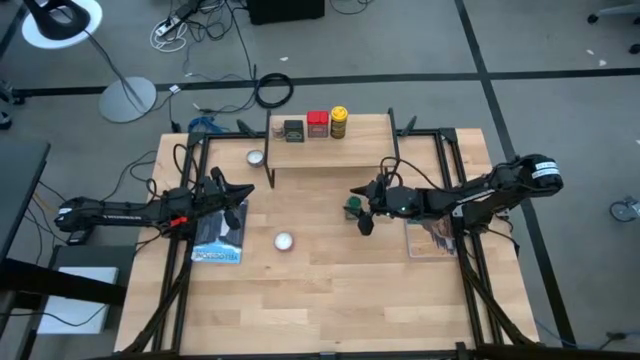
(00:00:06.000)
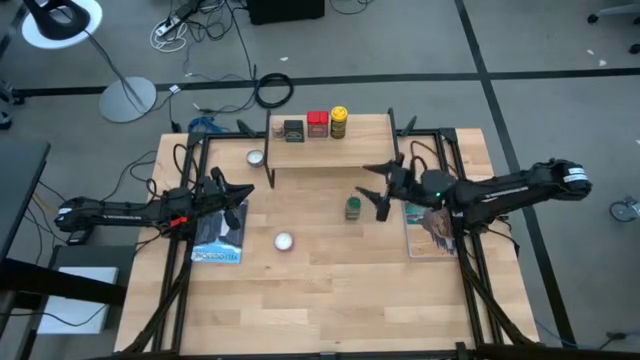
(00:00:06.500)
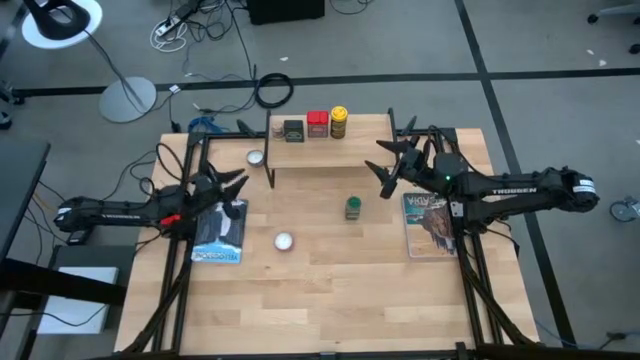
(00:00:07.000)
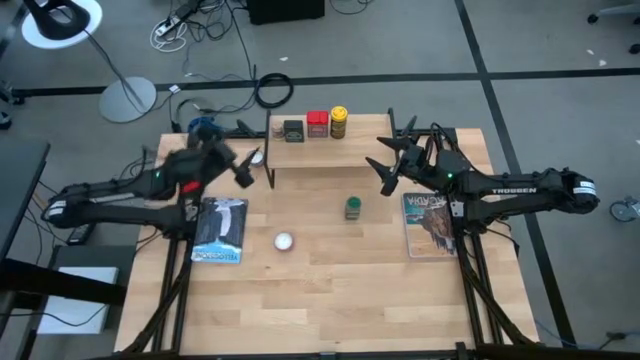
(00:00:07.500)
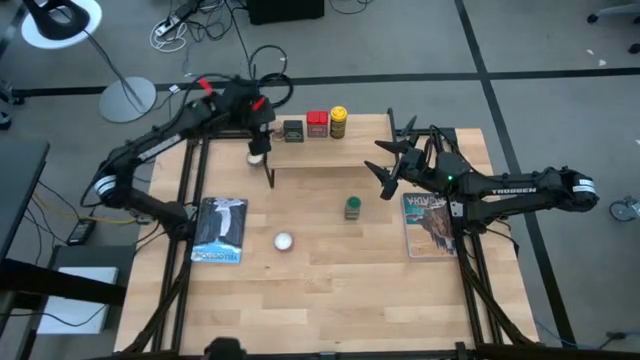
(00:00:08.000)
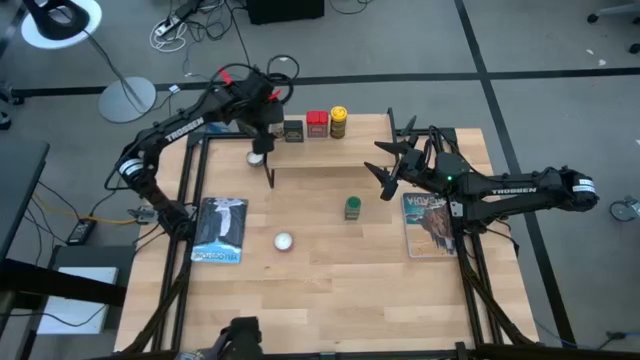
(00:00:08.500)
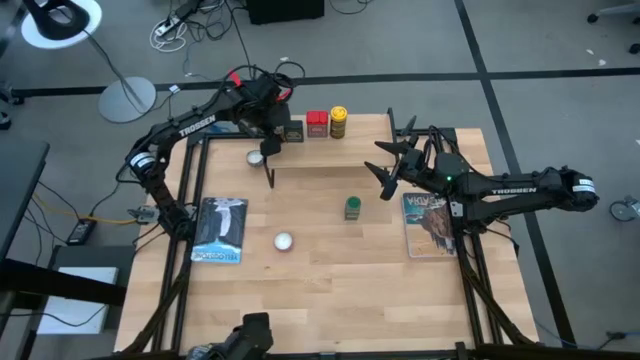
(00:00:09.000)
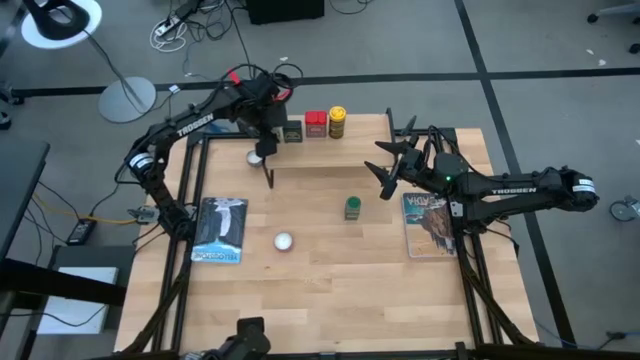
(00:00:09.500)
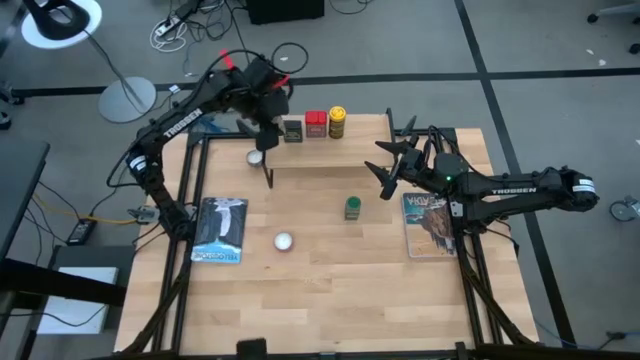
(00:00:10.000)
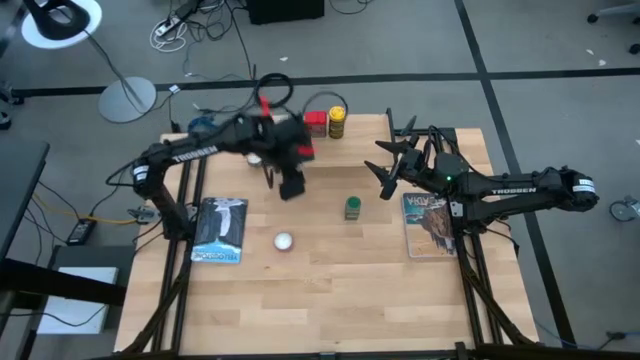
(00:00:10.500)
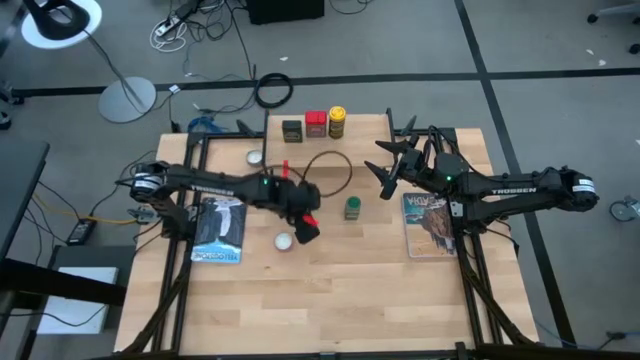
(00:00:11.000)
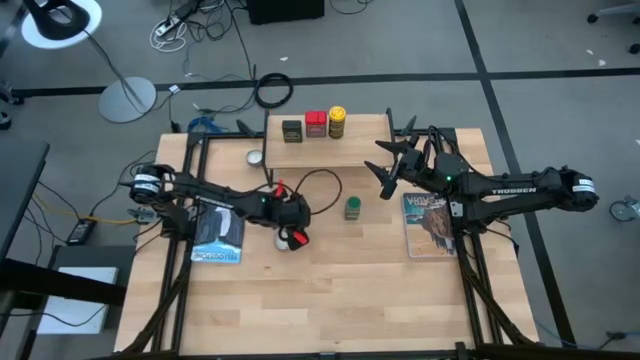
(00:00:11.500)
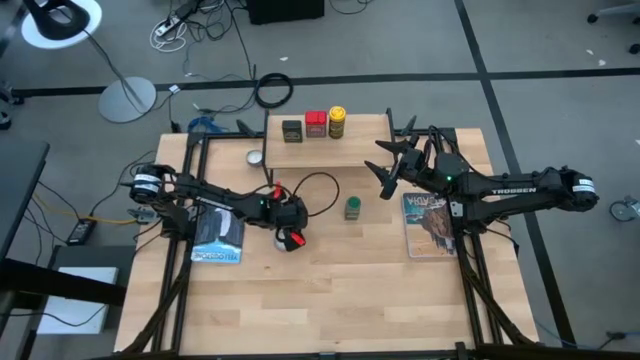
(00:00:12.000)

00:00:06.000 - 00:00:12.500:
Task: Shelf spices
Remove the brown seasoning bottle from the shelf

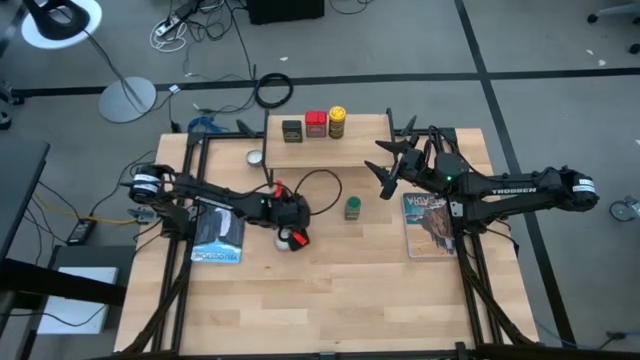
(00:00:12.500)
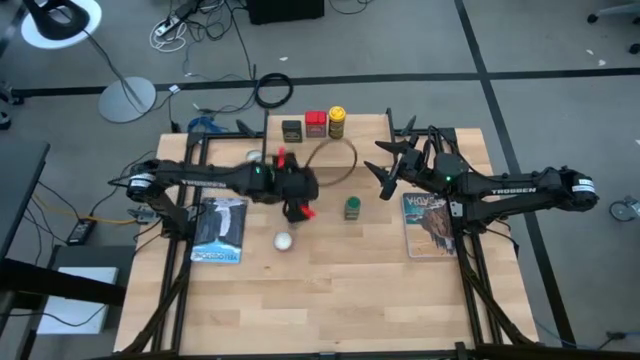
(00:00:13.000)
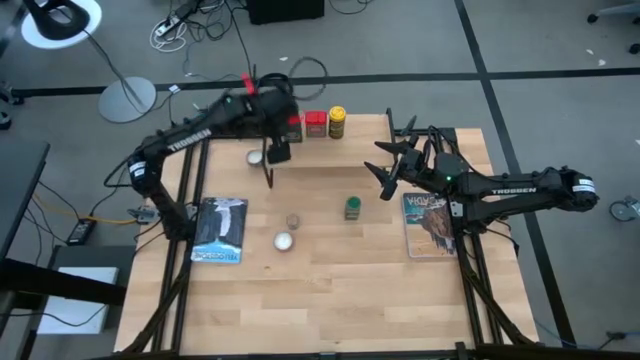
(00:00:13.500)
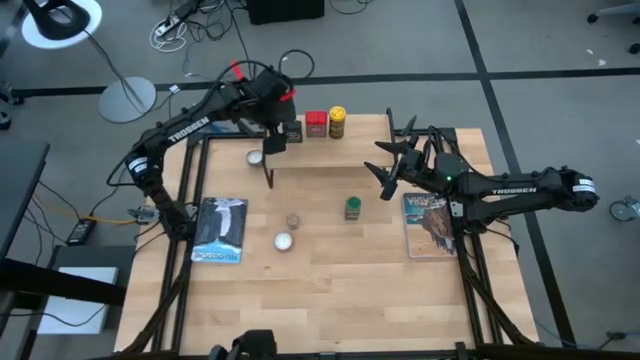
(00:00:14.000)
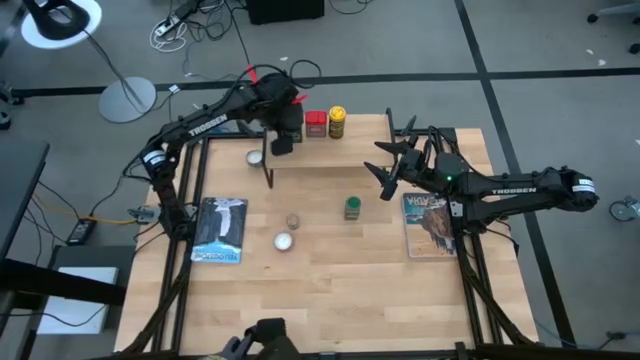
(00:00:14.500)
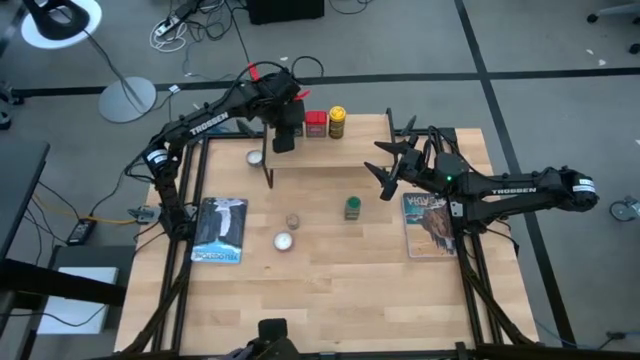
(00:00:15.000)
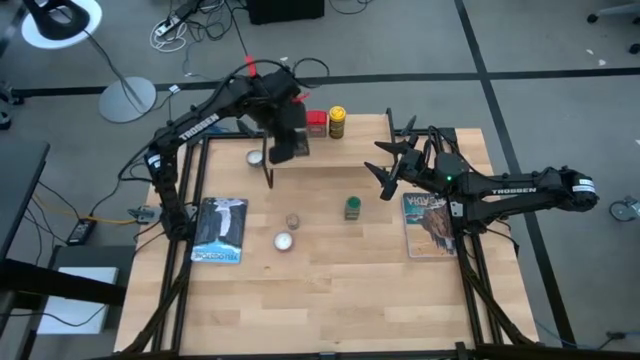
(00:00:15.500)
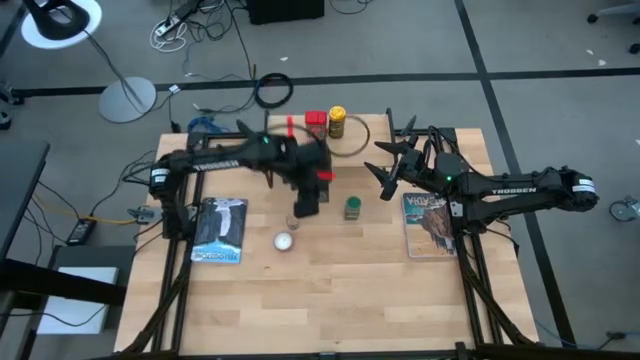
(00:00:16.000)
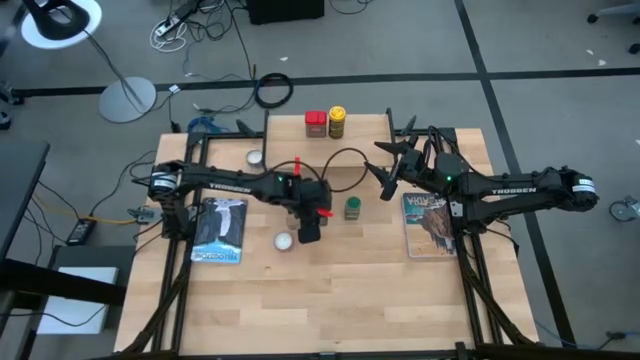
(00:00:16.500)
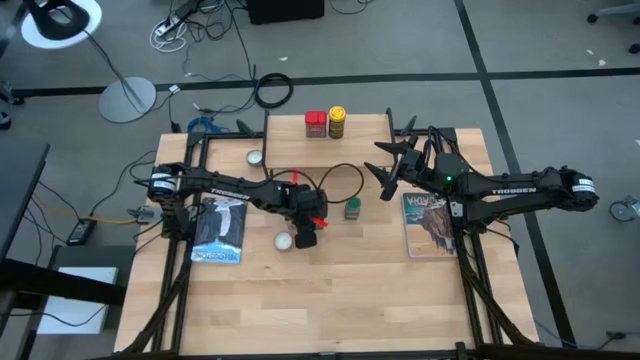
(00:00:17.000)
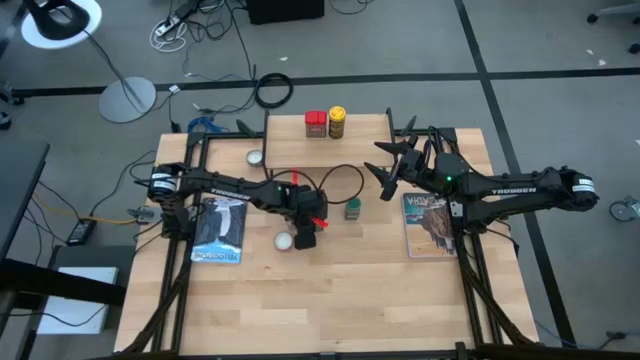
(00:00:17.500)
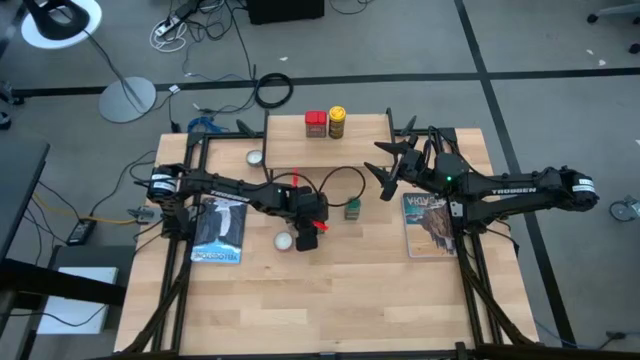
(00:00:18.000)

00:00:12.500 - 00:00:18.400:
Remove the black seasoning can from the shelf

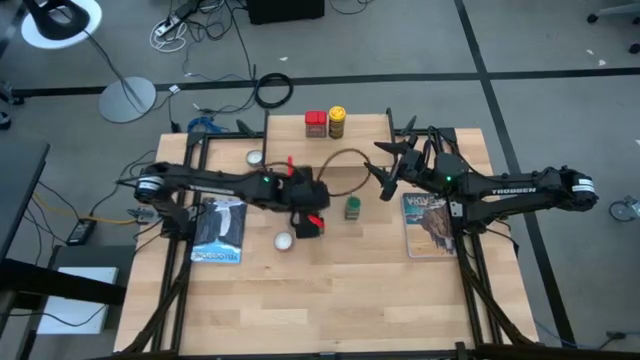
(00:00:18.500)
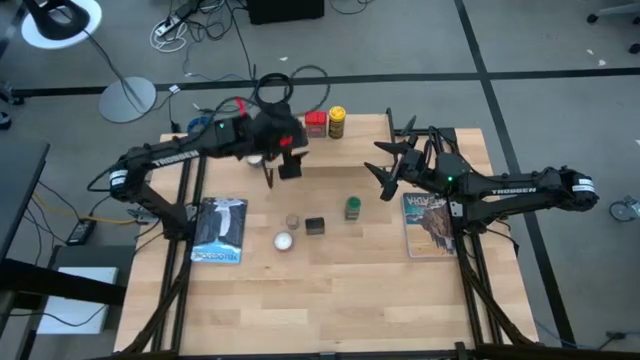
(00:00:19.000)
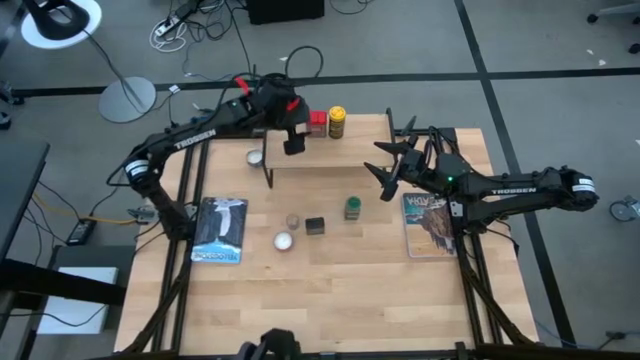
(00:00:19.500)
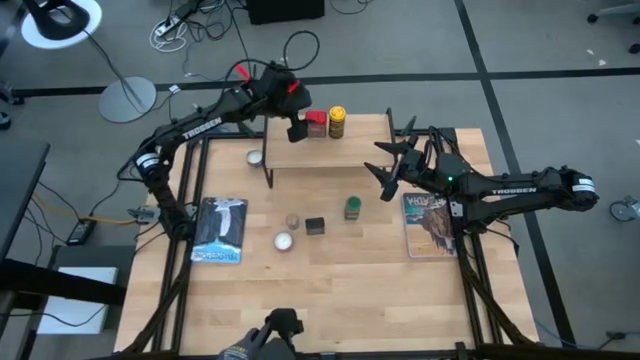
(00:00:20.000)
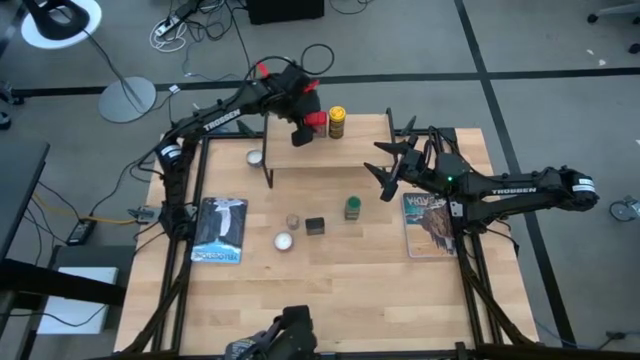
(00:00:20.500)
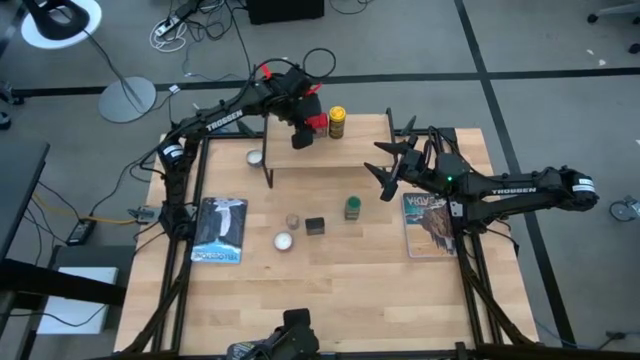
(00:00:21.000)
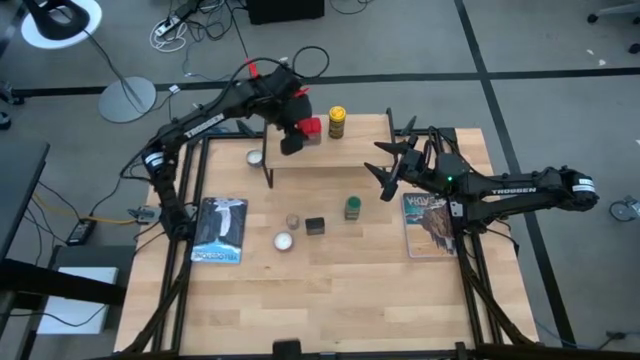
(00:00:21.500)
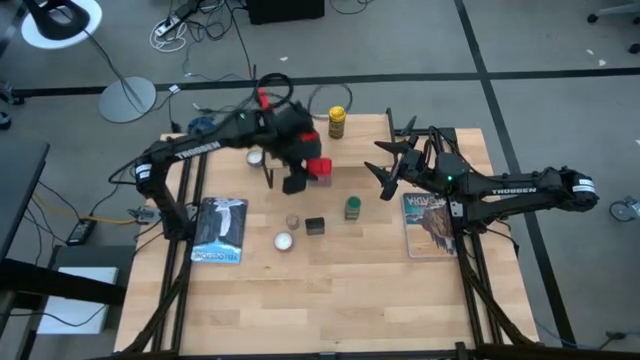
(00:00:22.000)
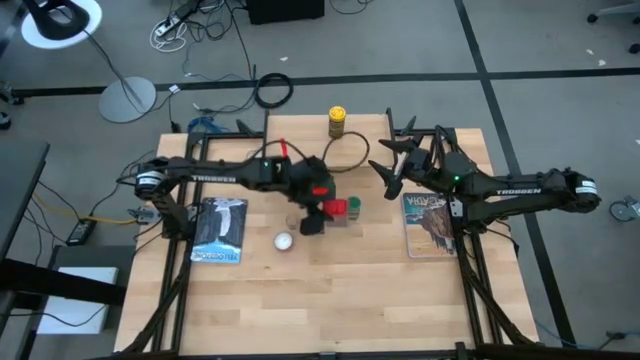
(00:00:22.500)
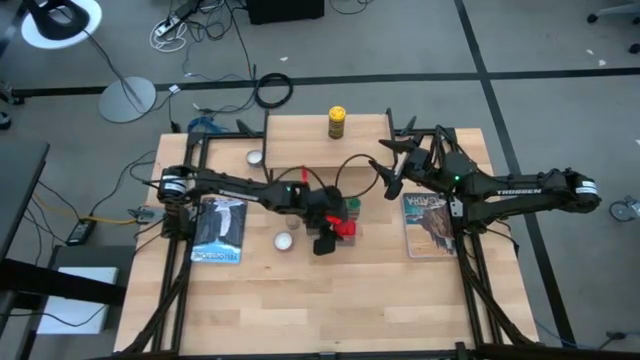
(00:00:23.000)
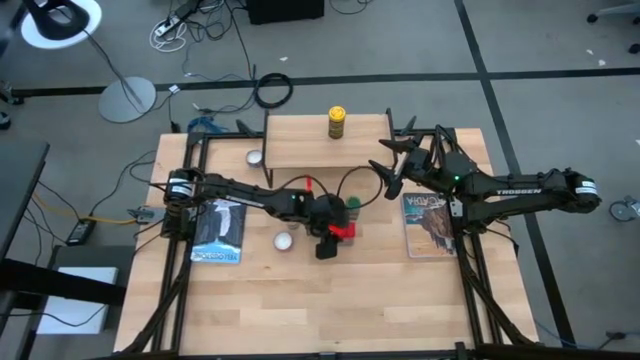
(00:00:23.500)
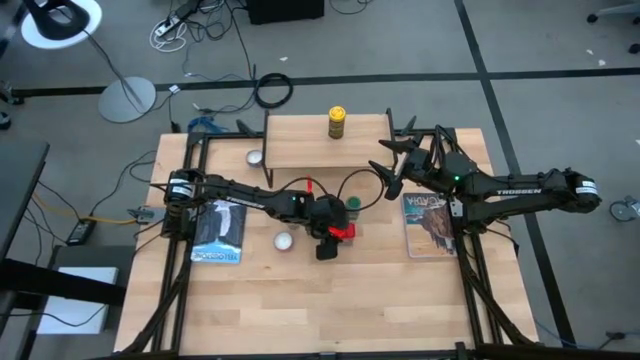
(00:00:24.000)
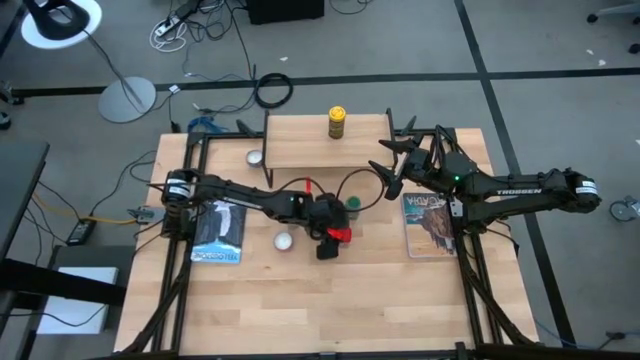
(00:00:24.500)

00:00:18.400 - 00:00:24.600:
Remove the red seasoning can from the shelf
